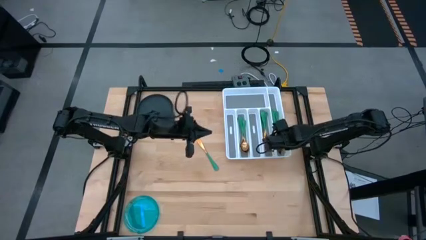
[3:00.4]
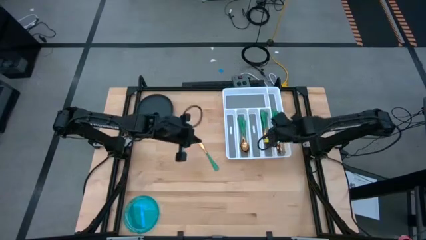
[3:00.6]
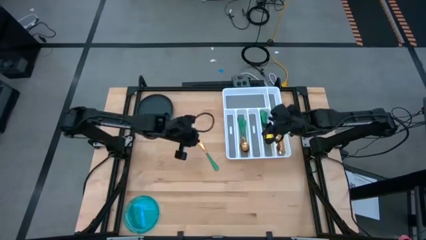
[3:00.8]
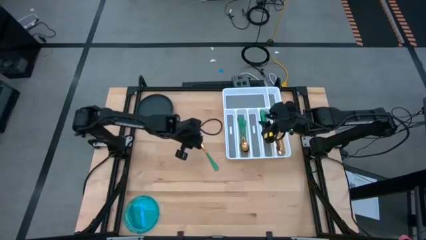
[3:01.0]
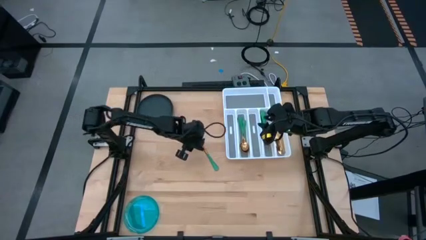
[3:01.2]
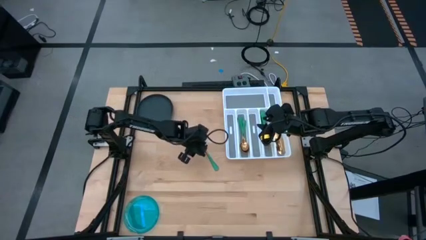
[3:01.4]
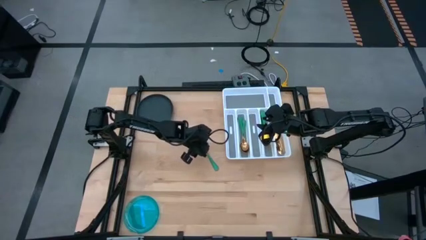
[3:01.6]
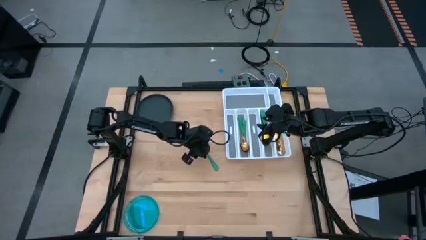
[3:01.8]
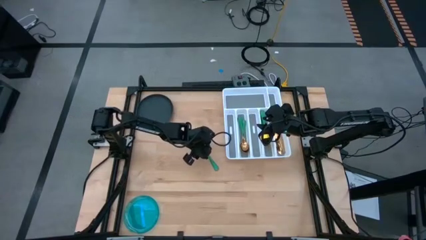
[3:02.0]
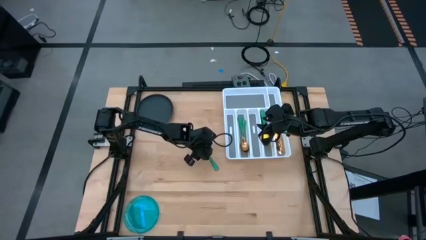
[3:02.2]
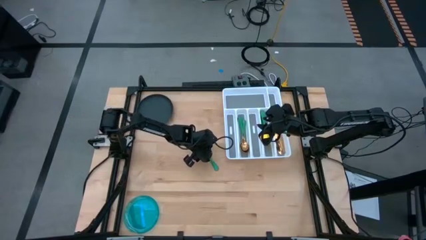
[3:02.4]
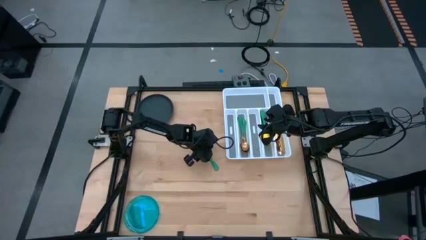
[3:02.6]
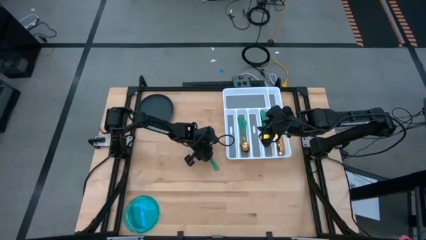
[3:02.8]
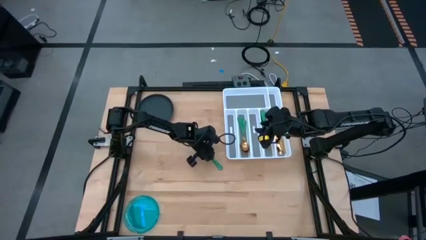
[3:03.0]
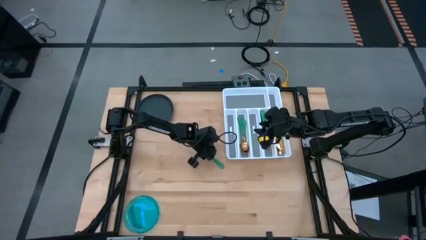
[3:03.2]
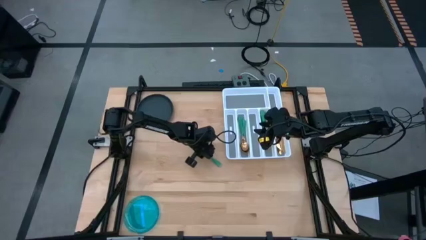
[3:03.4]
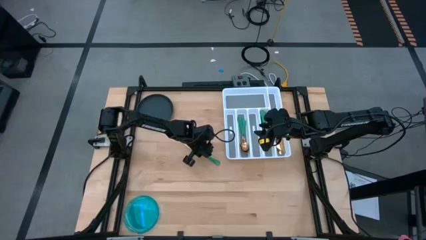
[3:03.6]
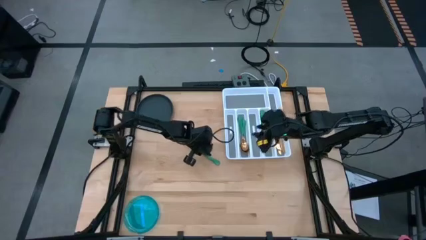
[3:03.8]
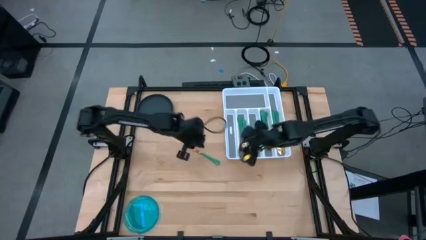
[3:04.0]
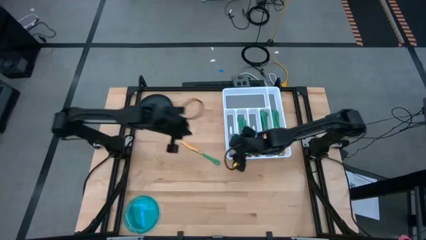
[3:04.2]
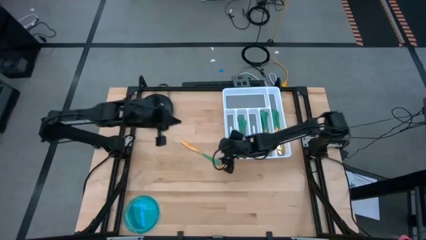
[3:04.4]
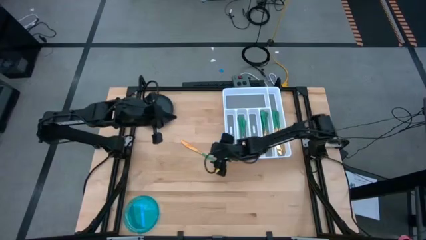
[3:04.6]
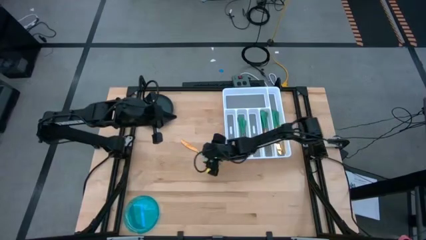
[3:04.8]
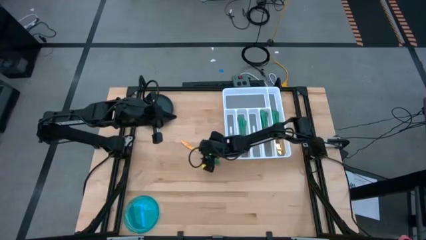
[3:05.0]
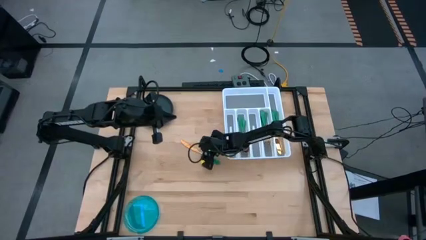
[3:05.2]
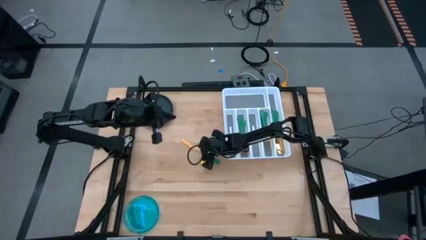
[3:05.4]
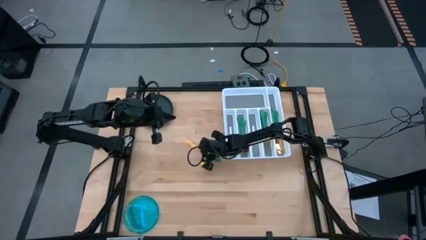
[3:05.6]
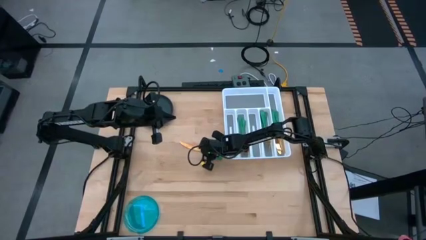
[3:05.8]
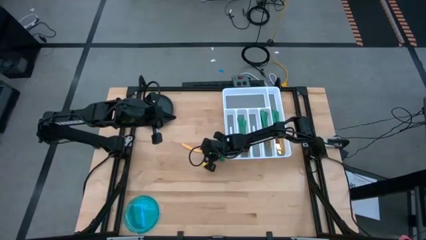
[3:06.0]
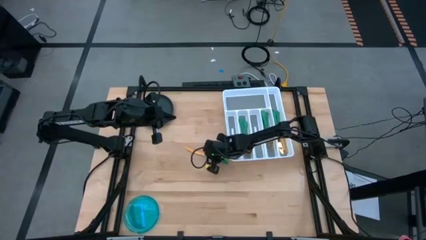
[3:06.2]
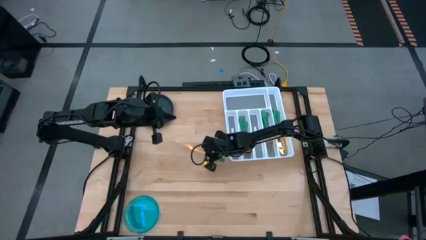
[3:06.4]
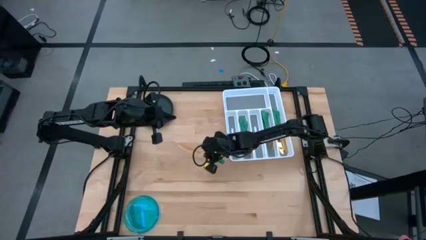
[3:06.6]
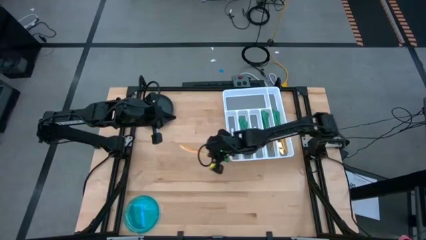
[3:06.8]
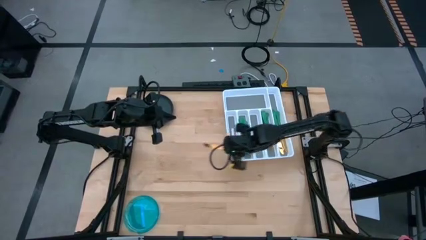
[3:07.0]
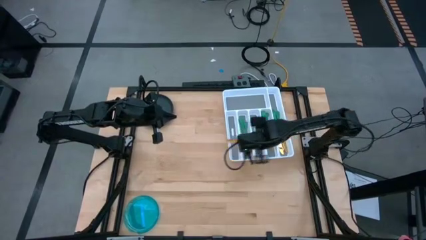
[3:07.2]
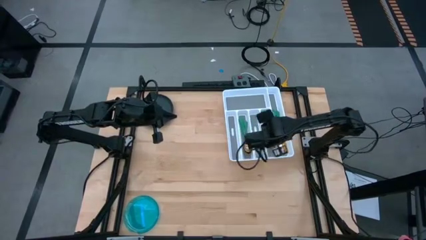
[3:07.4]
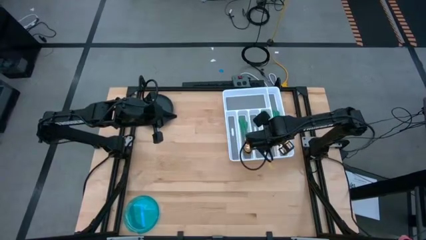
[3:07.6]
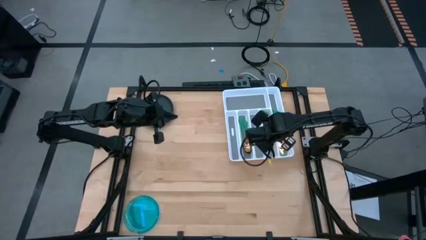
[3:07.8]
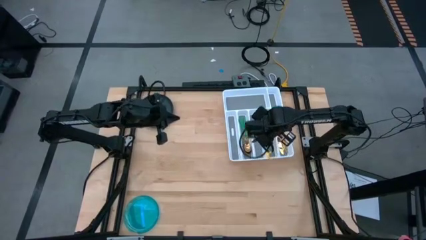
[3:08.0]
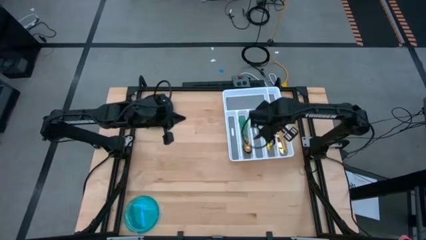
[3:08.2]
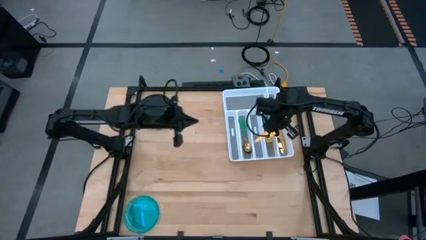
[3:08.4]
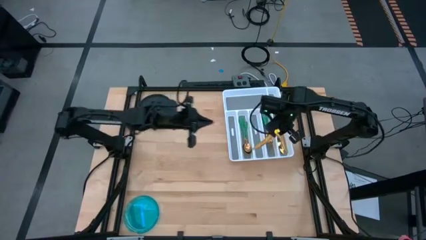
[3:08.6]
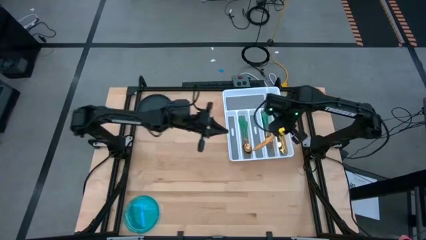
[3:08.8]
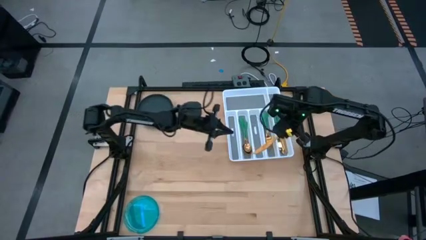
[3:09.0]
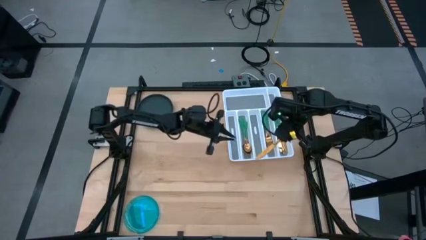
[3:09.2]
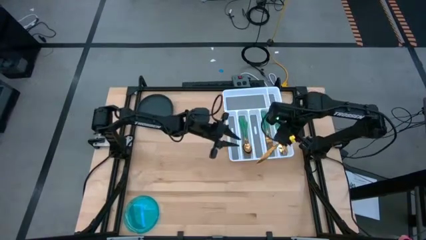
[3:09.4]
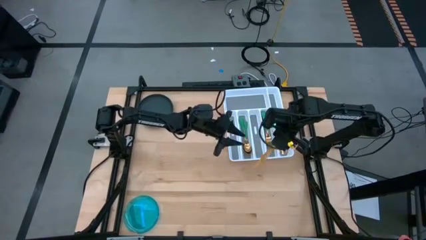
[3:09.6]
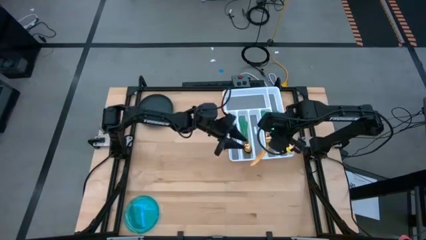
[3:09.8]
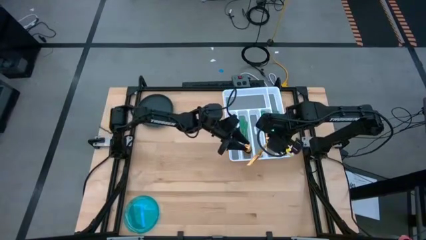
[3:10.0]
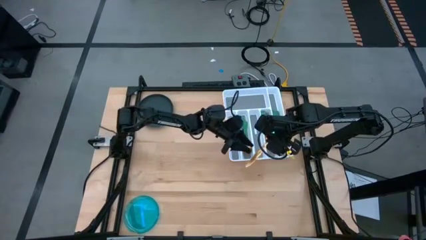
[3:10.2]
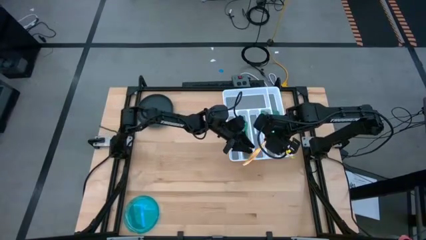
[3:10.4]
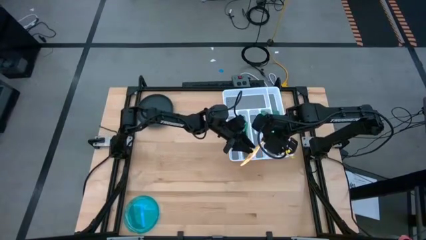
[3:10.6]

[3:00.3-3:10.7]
Task: Sort silverware
Put the green knife into the silverware tray
